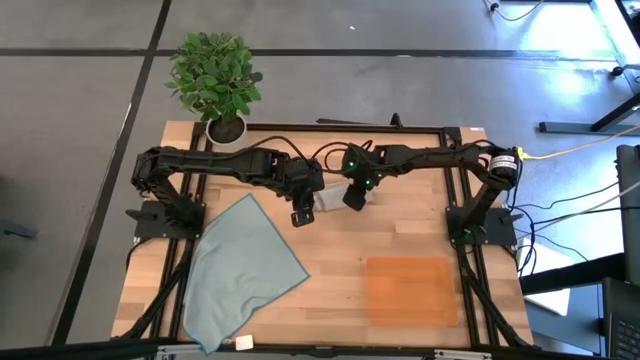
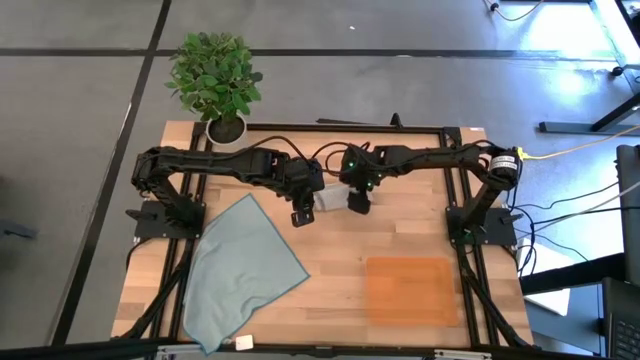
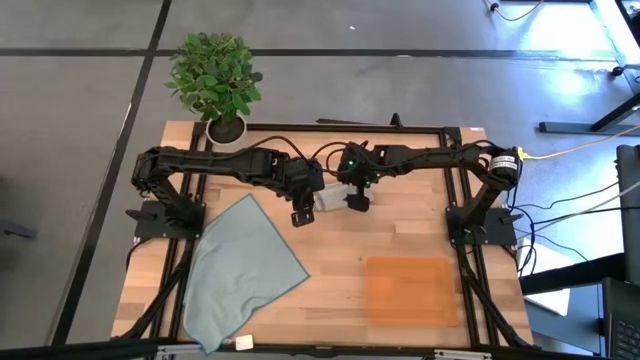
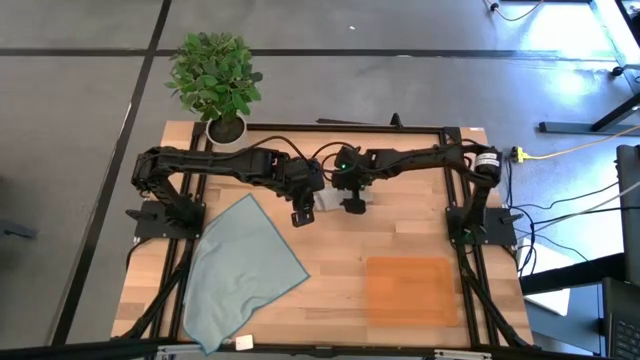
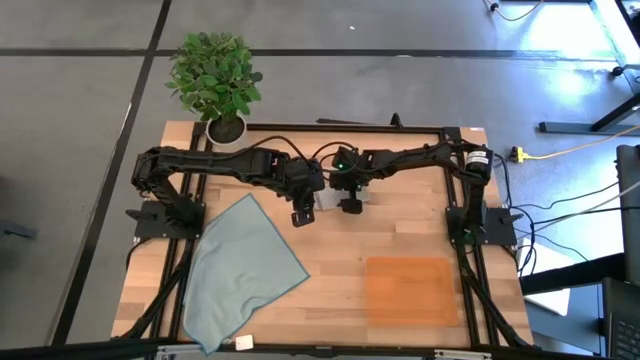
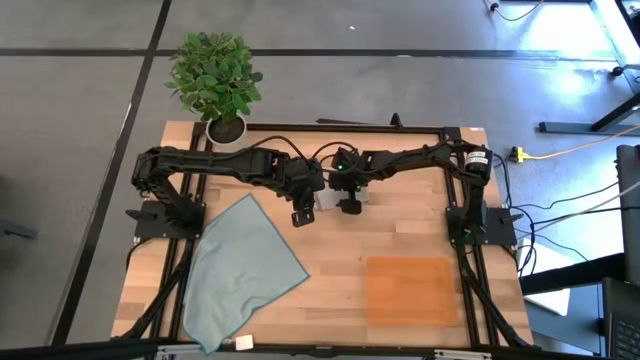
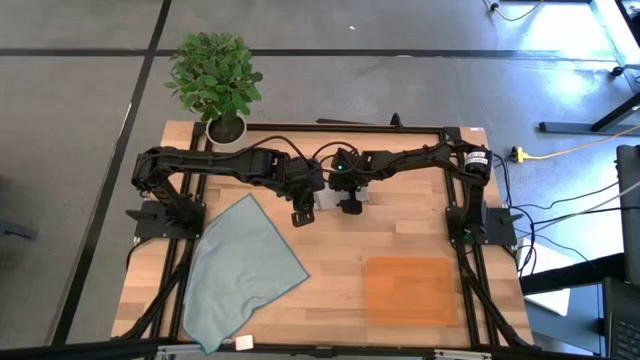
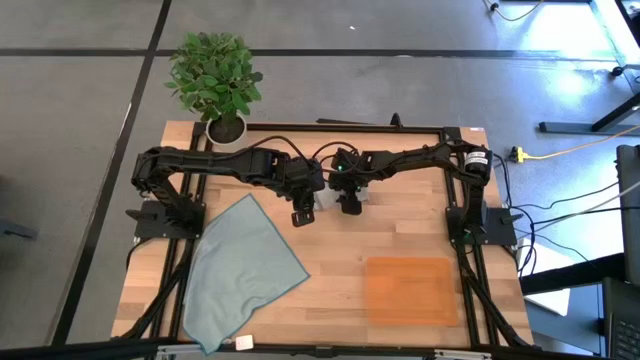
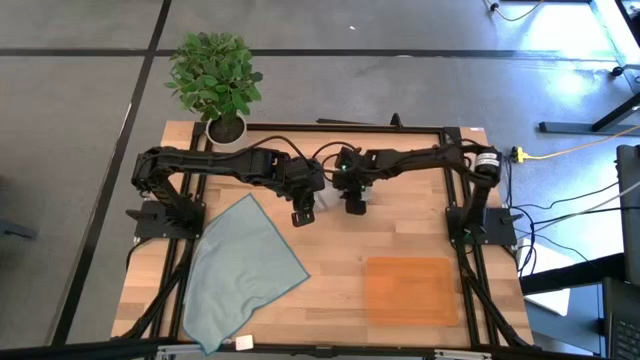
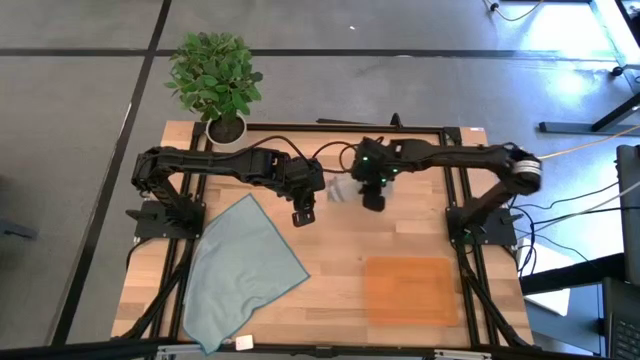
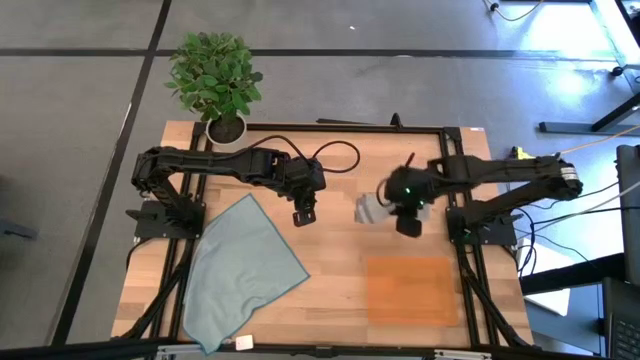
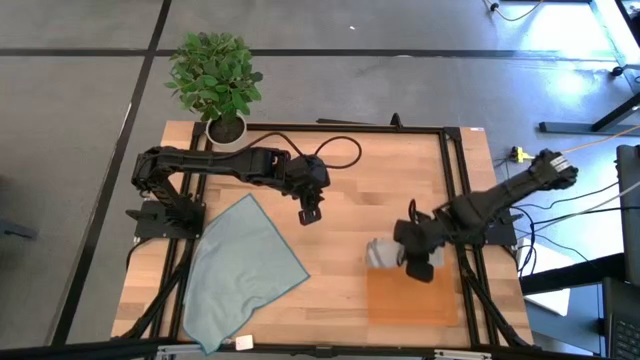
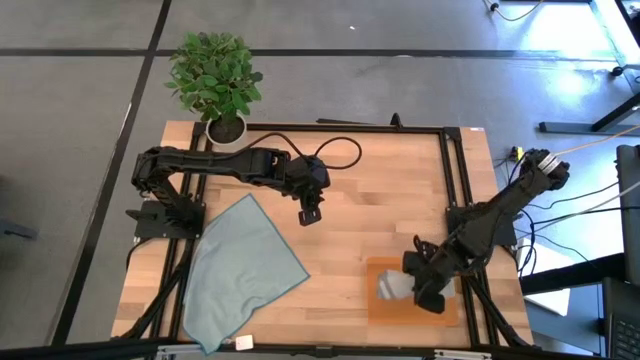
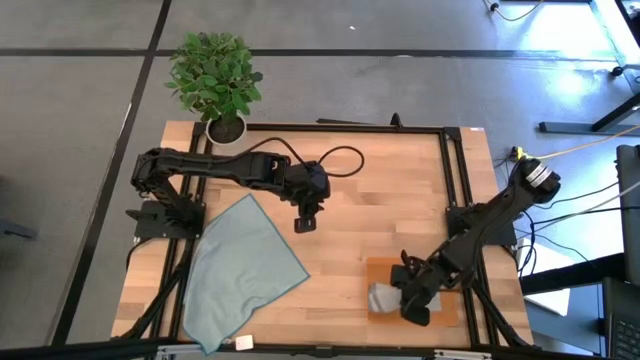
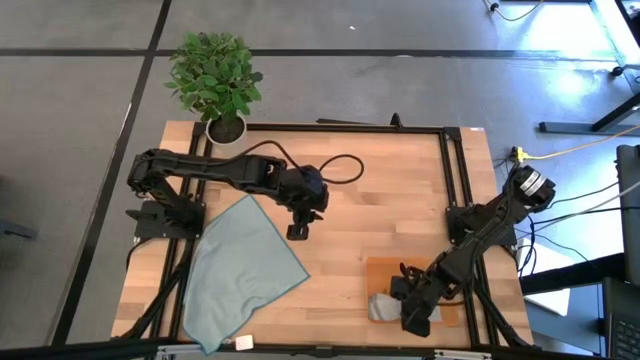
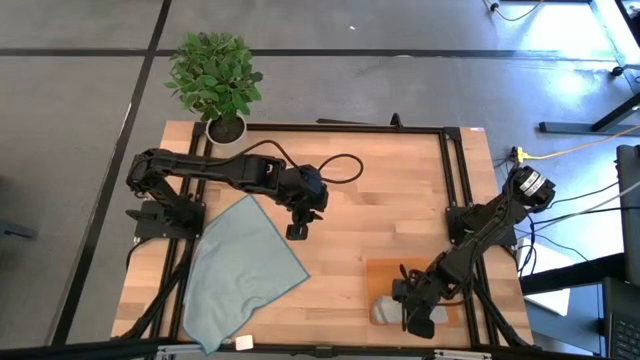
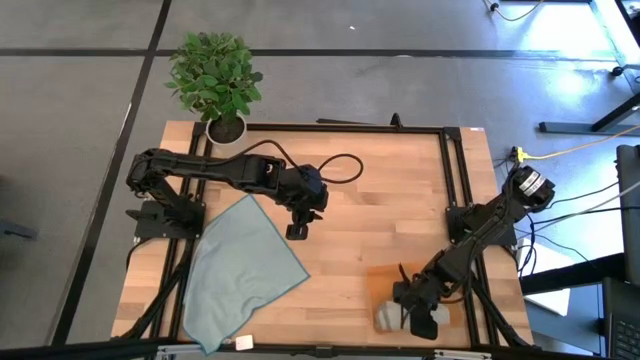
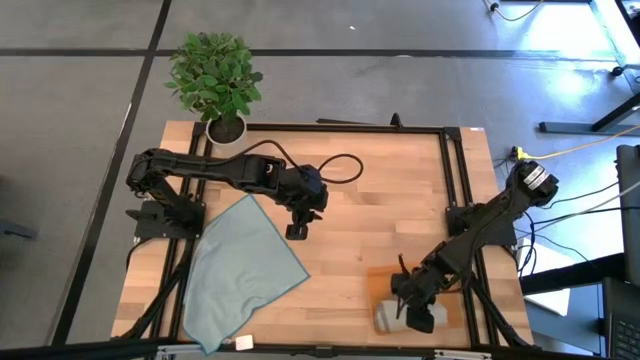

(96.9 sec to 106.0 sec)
Task: Roll microfiber towels into tight, uniform cylinder then place into a basket
Put the rolled gray microfiber towel into the orange bin

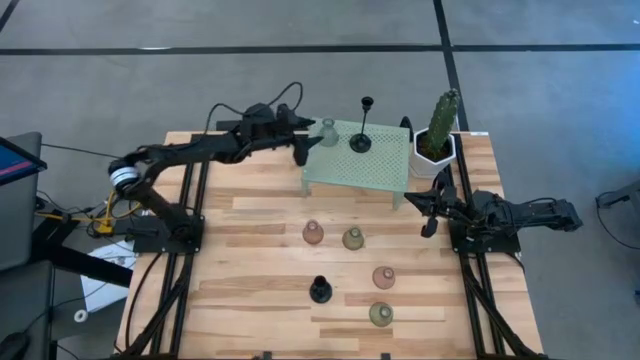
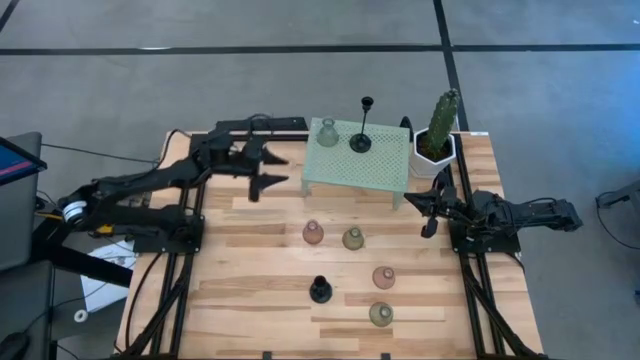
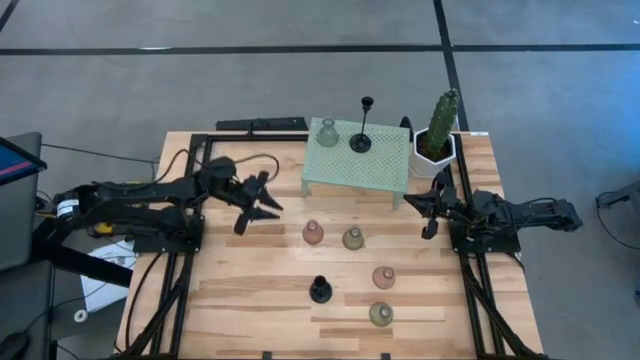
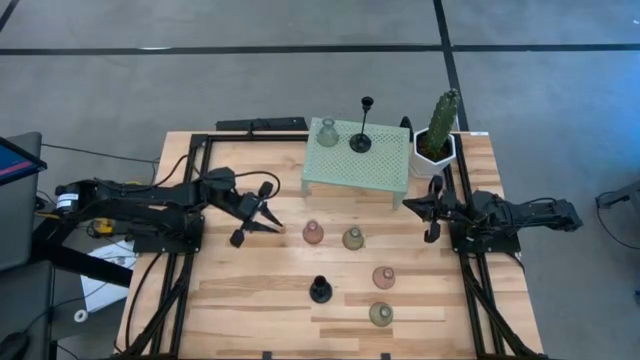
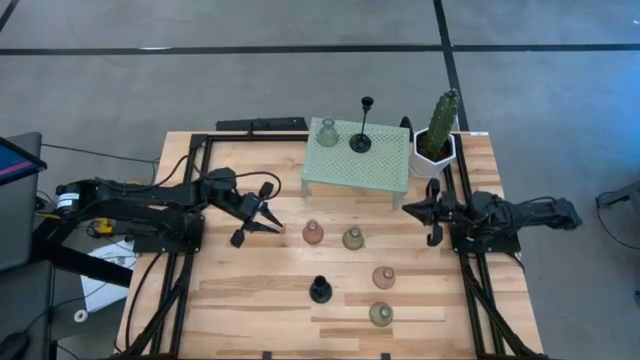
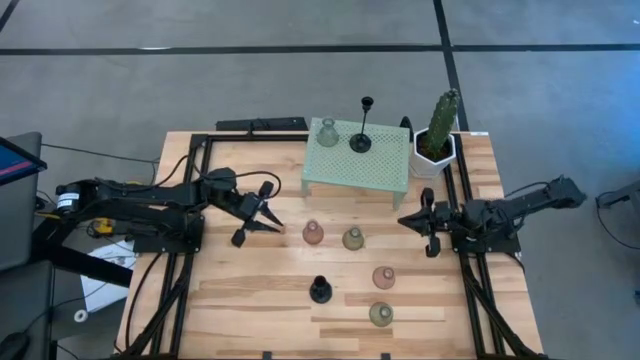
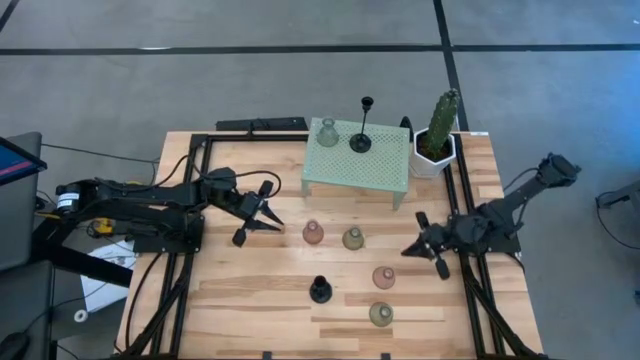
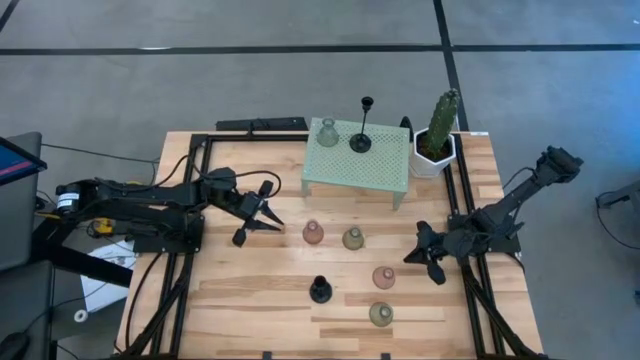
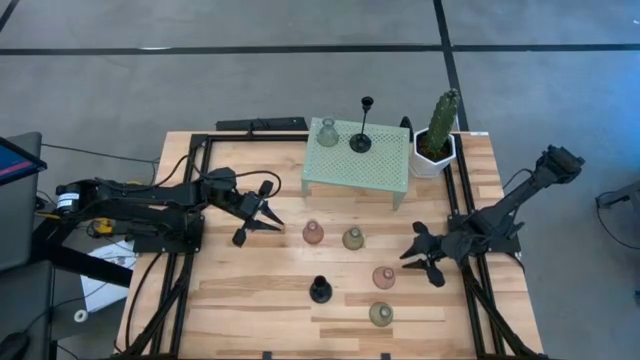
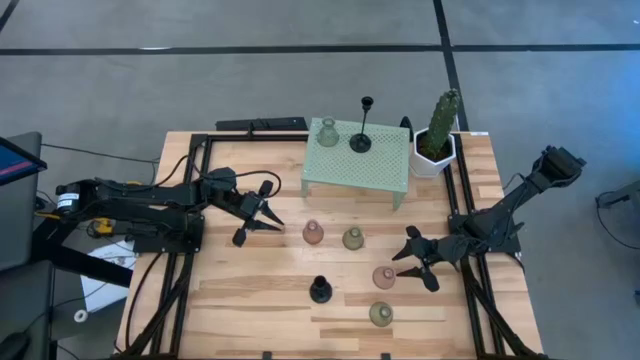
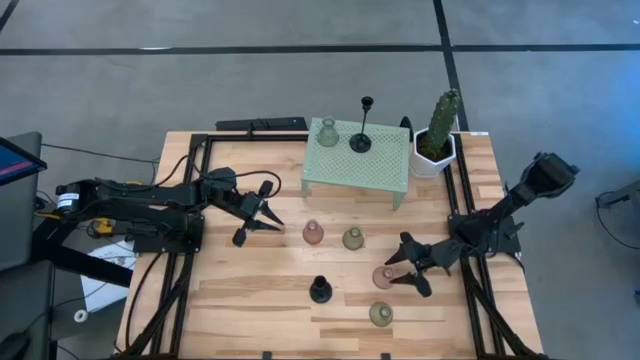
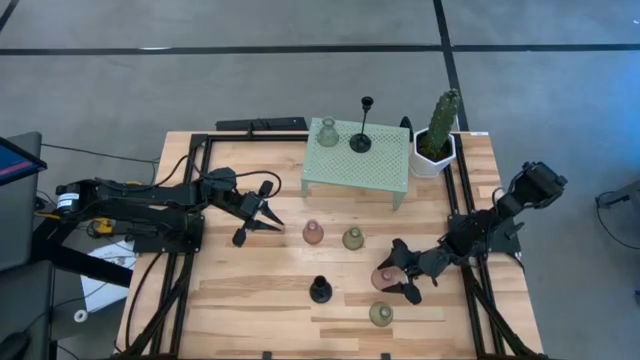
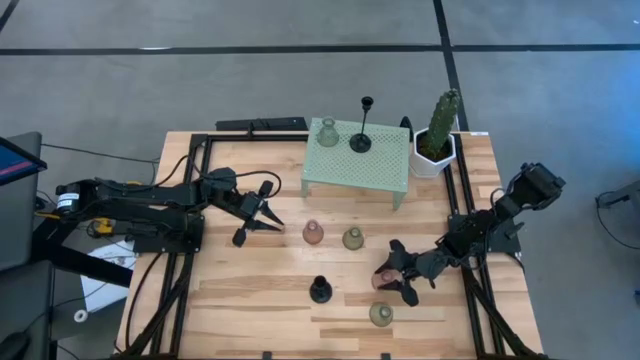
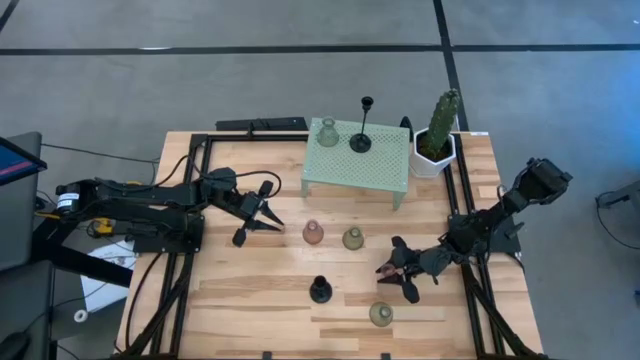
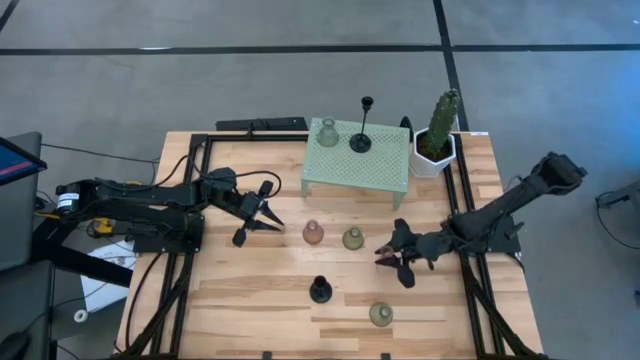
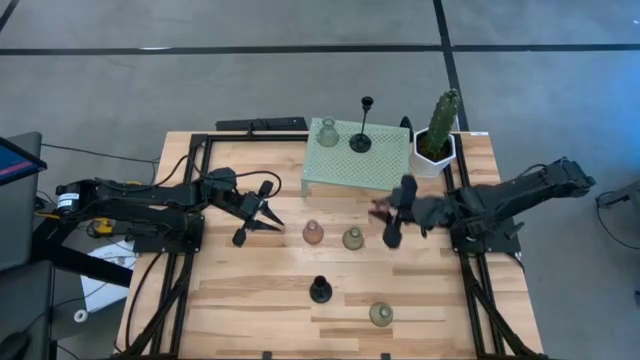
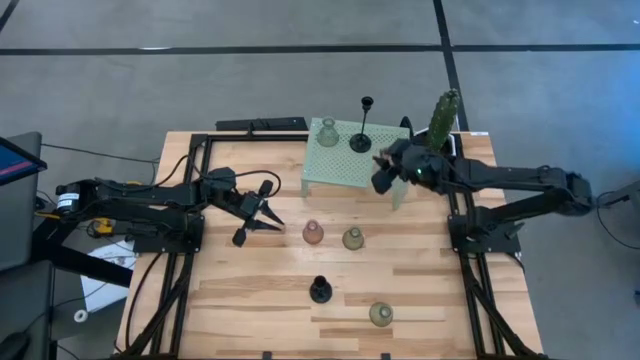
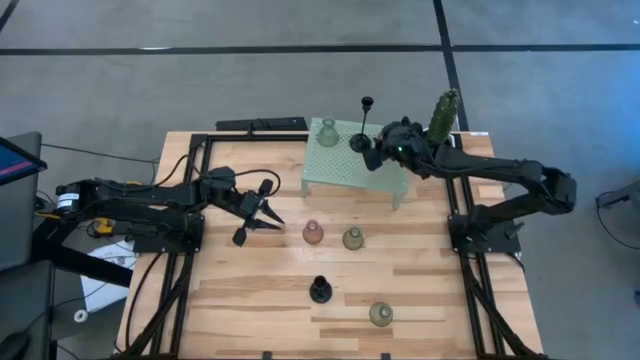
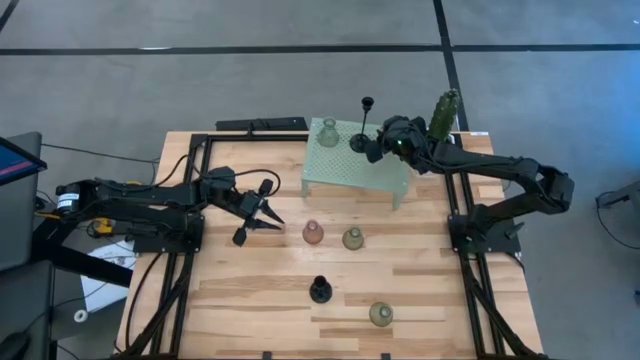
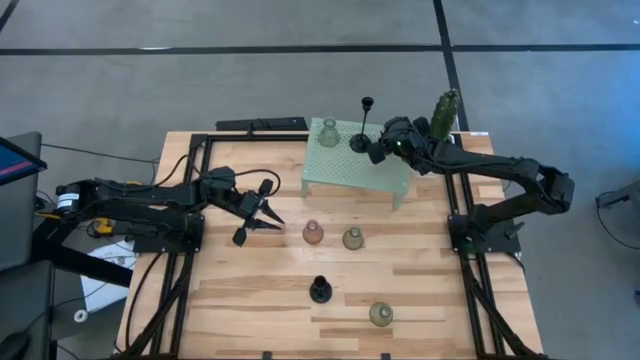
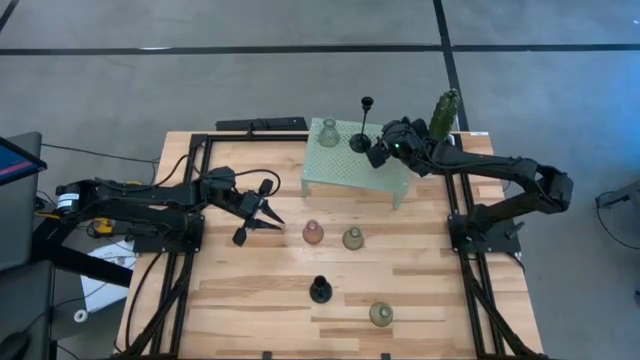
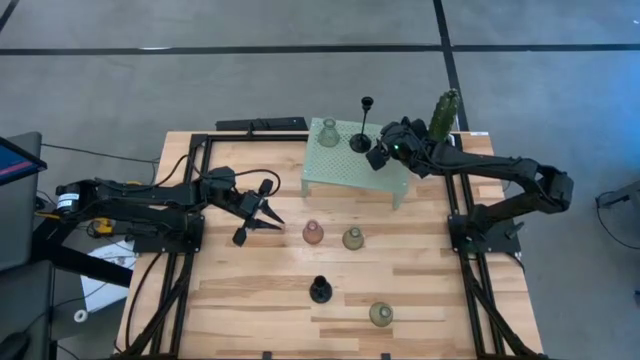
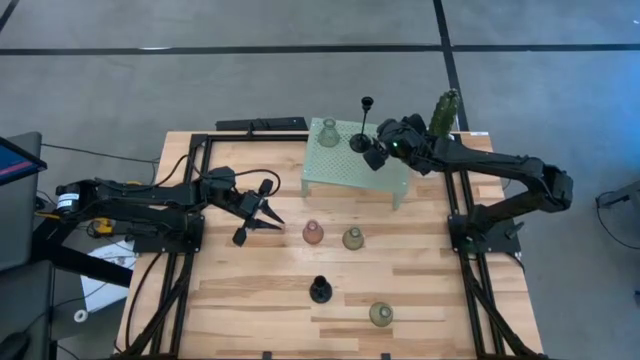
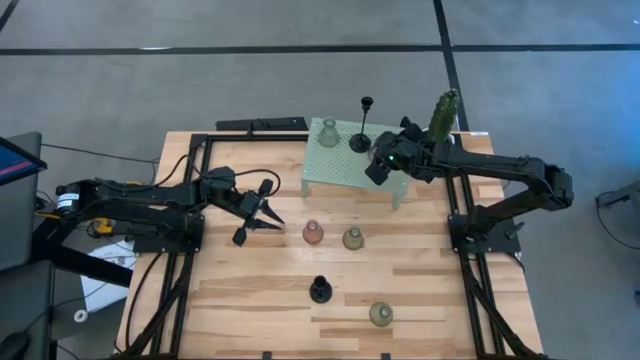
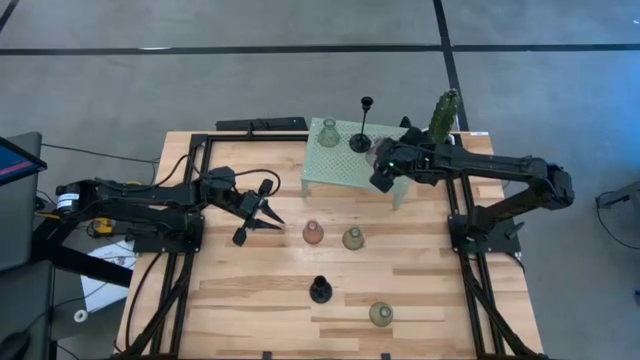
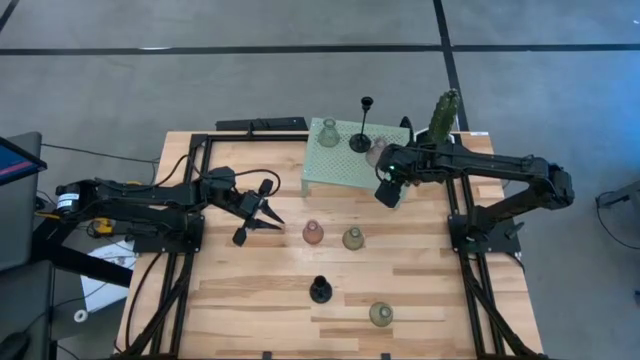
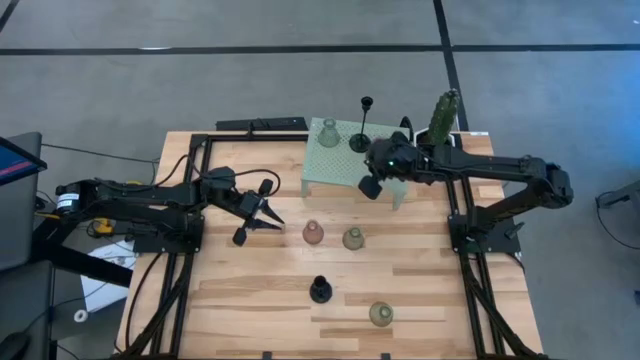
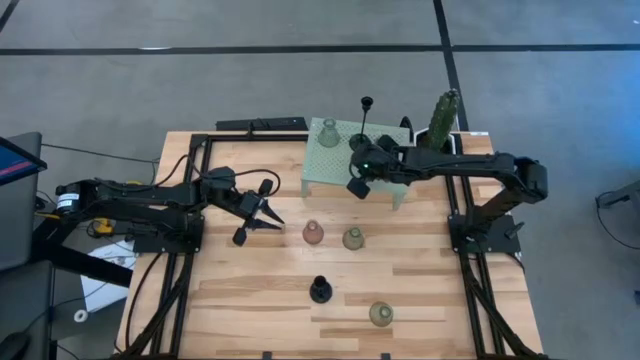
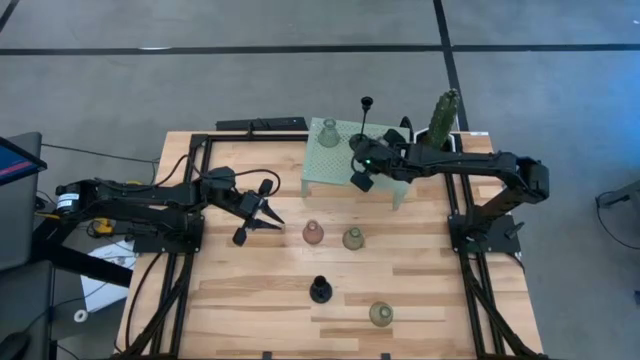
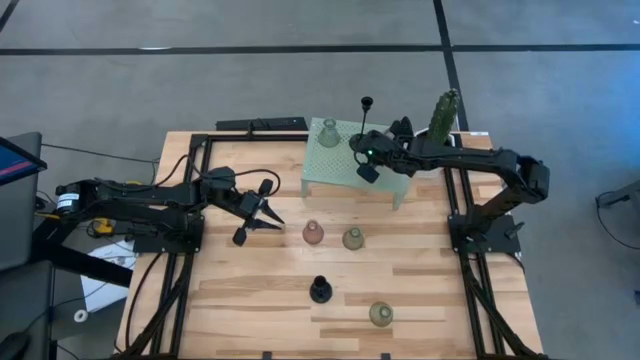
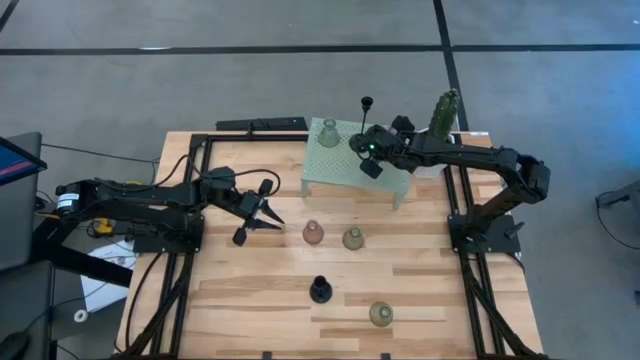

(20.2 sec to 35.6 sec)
Task: Pick & Place candle stick holders
Put the bottom pink glass candle holder on the shelf
